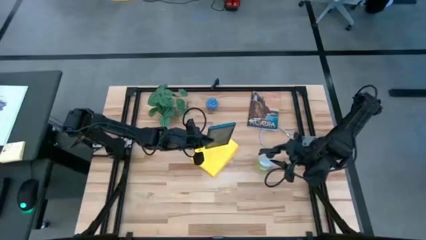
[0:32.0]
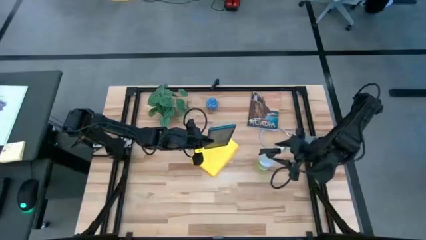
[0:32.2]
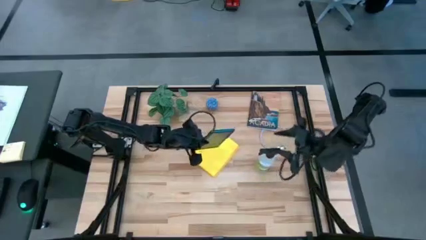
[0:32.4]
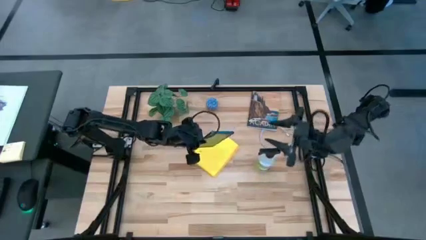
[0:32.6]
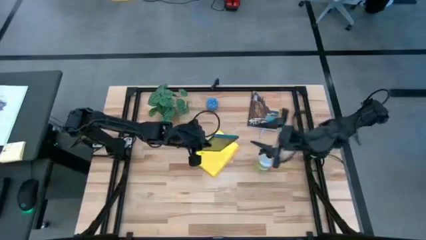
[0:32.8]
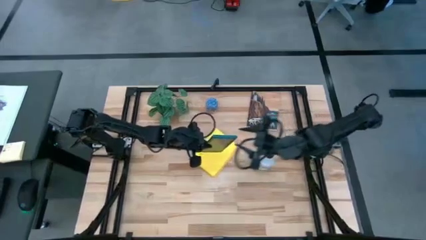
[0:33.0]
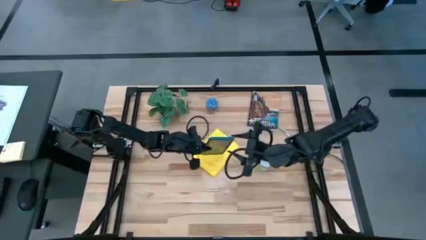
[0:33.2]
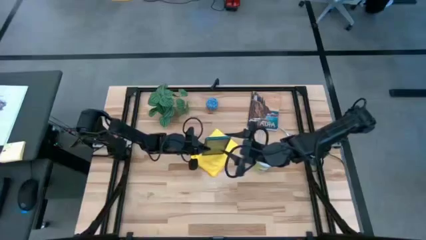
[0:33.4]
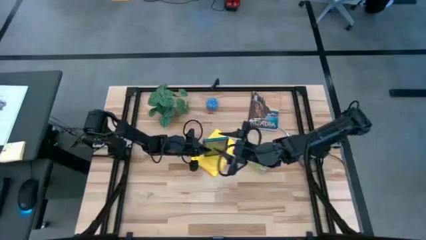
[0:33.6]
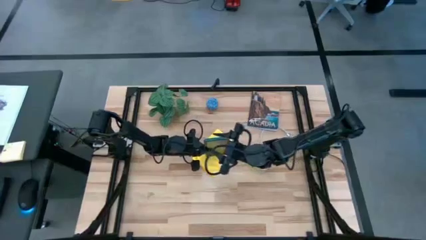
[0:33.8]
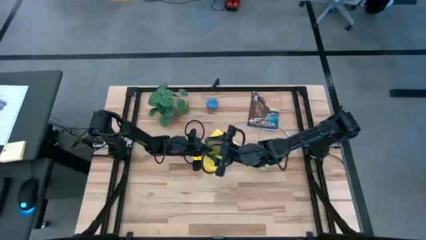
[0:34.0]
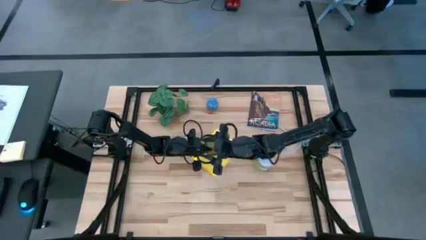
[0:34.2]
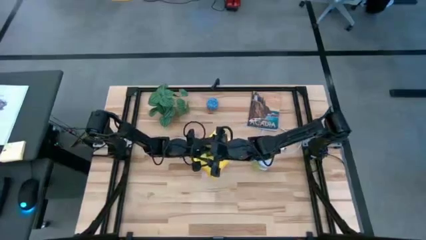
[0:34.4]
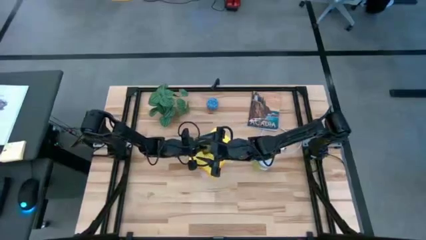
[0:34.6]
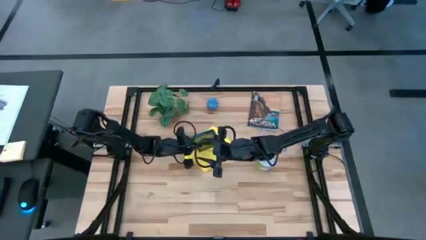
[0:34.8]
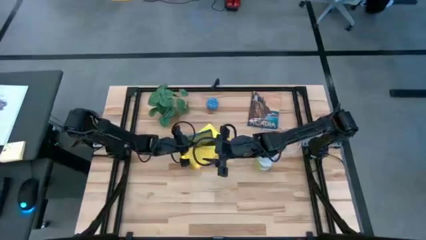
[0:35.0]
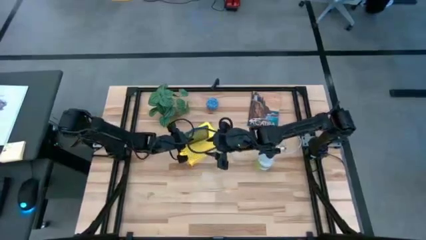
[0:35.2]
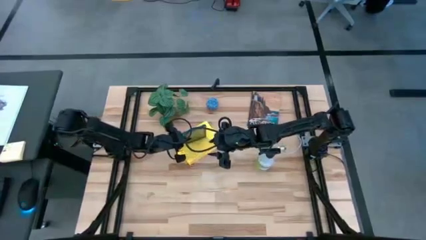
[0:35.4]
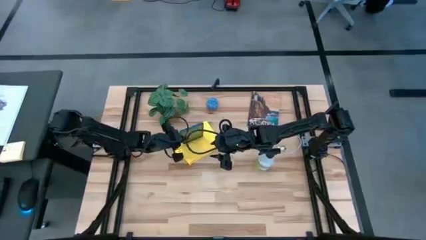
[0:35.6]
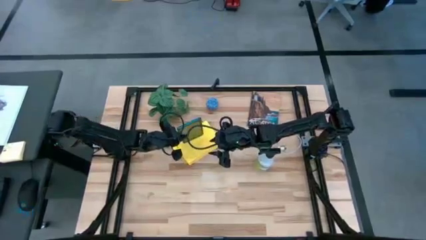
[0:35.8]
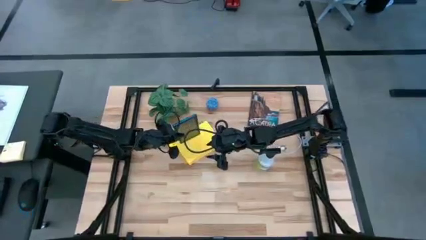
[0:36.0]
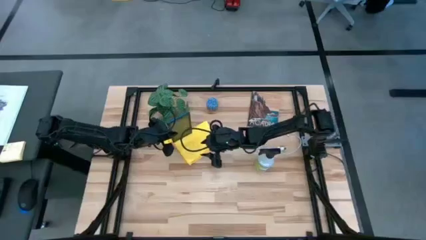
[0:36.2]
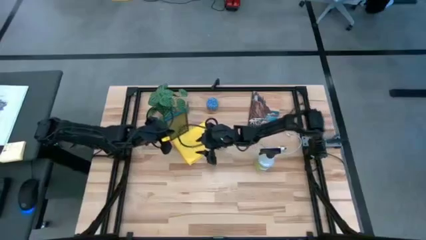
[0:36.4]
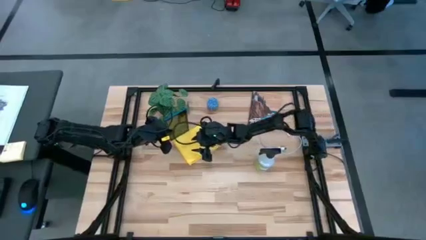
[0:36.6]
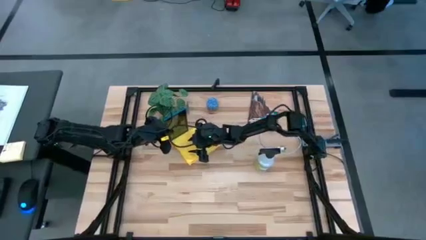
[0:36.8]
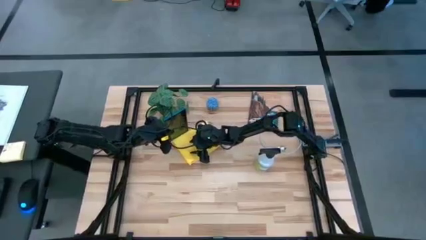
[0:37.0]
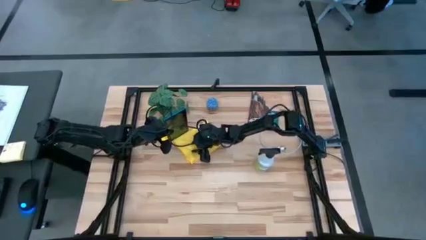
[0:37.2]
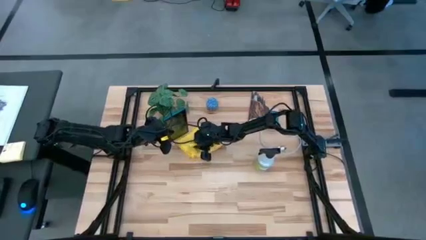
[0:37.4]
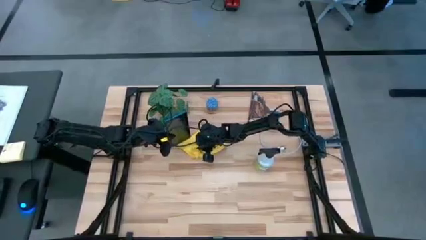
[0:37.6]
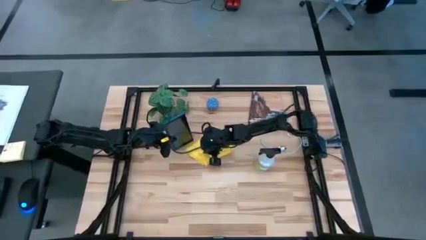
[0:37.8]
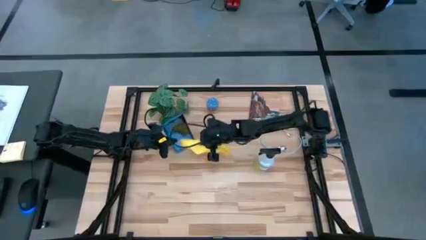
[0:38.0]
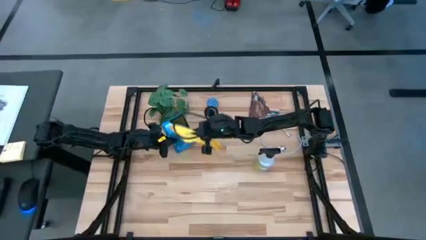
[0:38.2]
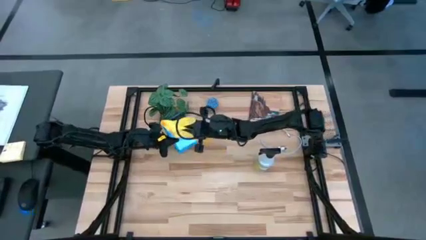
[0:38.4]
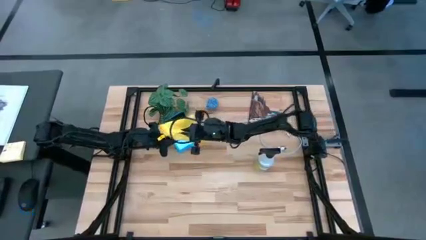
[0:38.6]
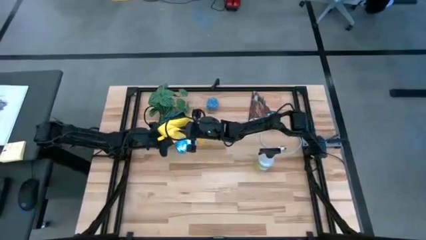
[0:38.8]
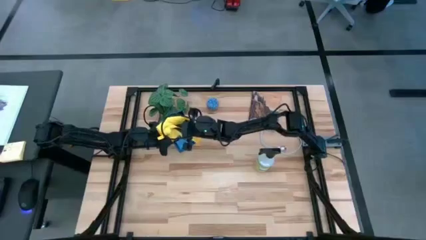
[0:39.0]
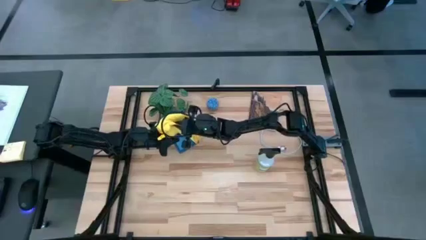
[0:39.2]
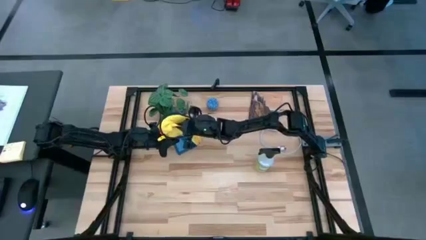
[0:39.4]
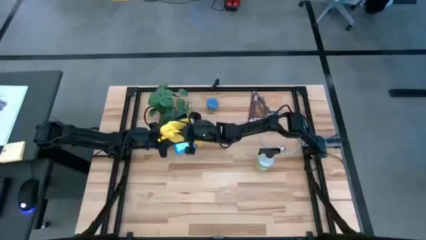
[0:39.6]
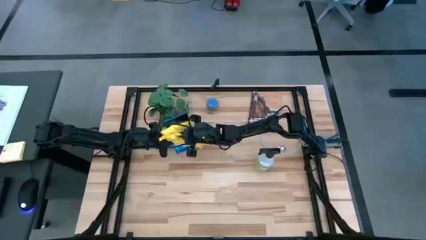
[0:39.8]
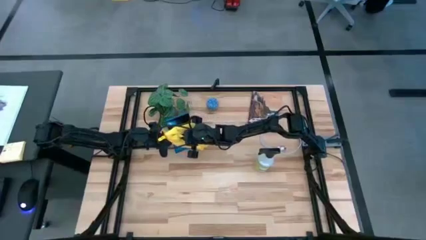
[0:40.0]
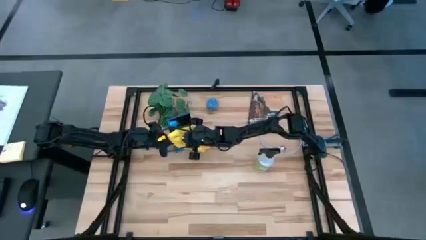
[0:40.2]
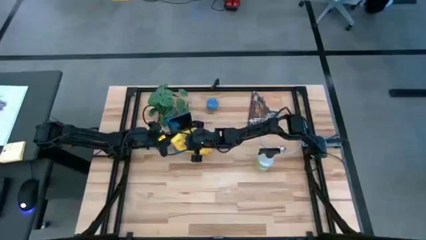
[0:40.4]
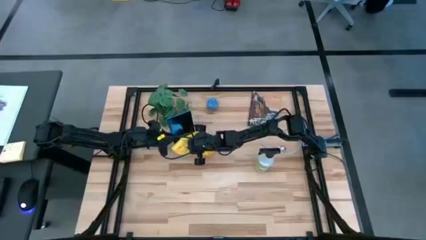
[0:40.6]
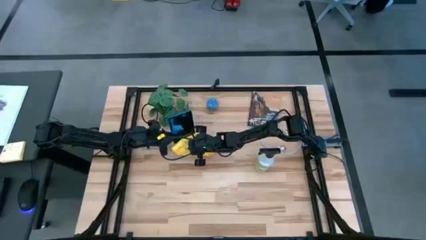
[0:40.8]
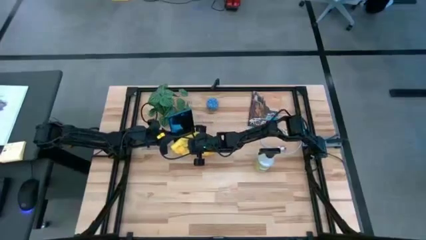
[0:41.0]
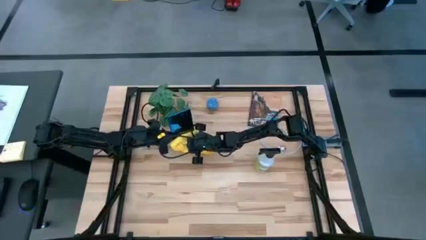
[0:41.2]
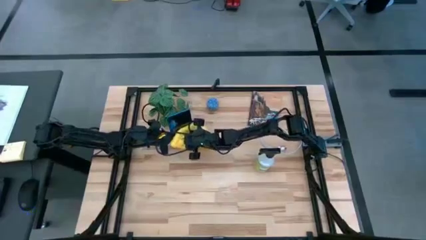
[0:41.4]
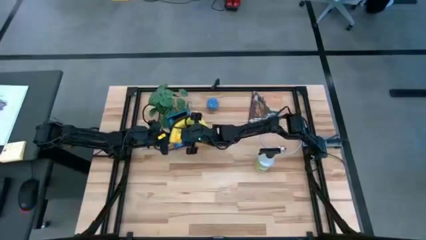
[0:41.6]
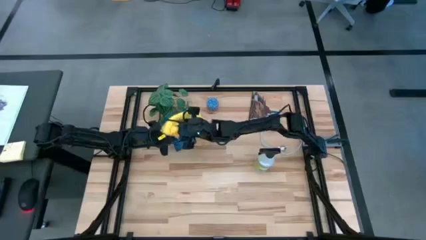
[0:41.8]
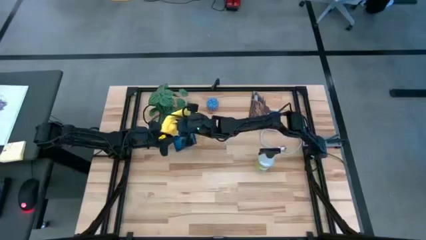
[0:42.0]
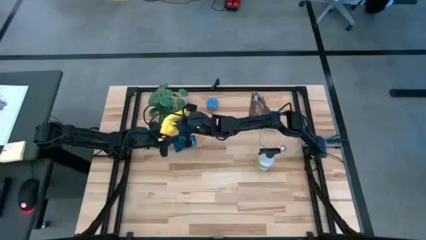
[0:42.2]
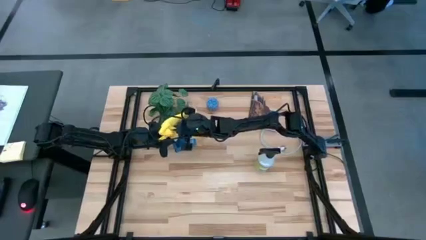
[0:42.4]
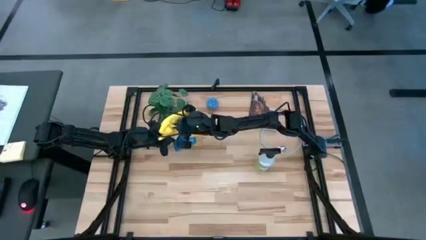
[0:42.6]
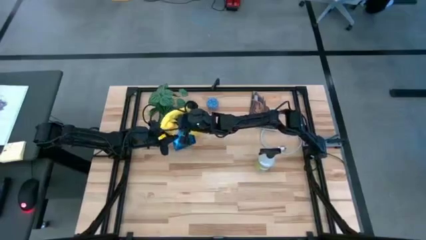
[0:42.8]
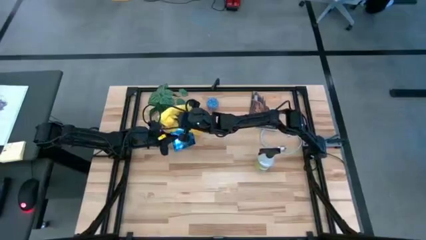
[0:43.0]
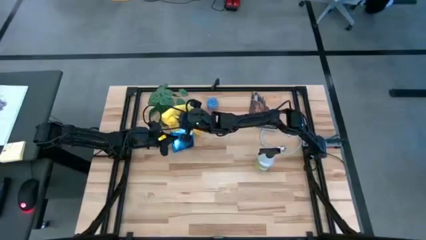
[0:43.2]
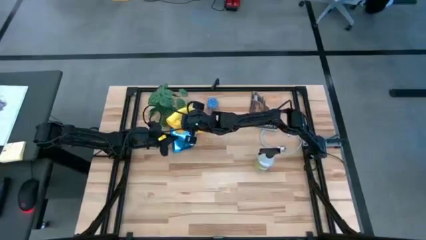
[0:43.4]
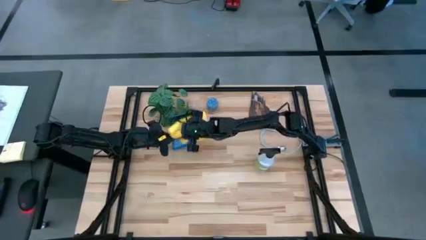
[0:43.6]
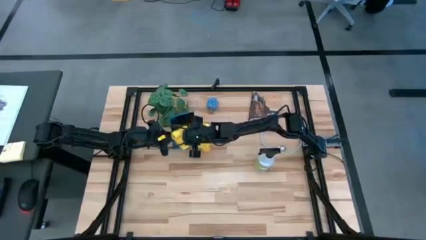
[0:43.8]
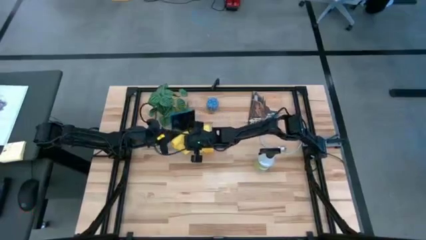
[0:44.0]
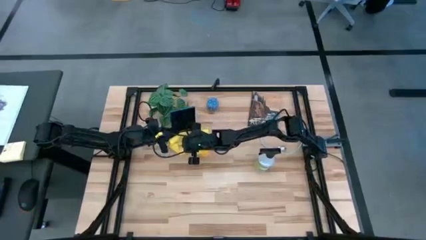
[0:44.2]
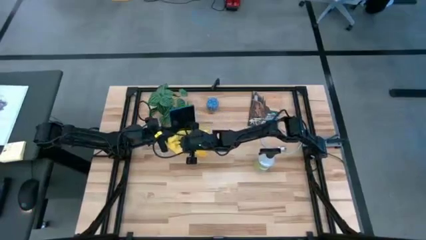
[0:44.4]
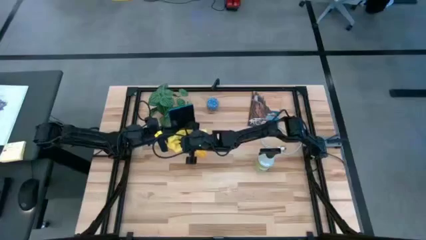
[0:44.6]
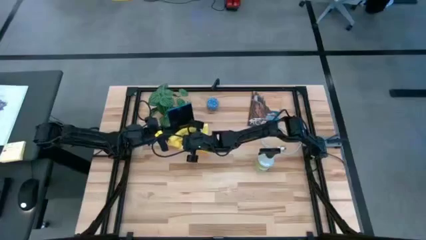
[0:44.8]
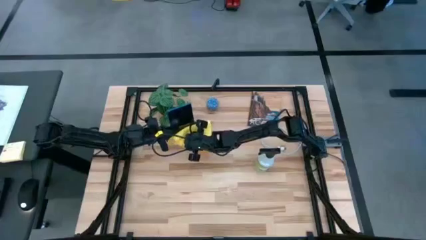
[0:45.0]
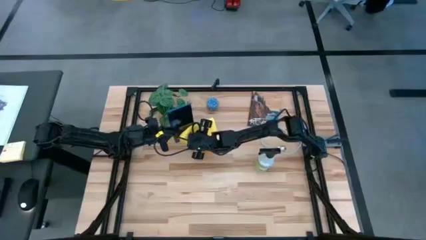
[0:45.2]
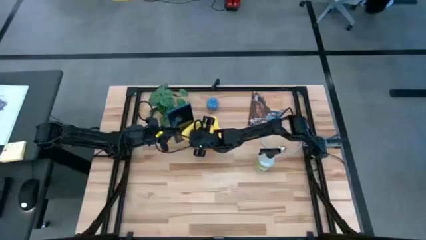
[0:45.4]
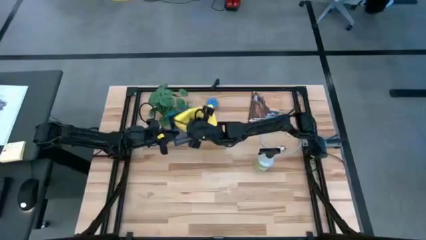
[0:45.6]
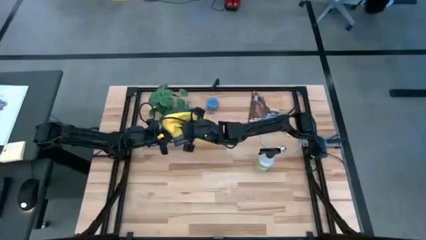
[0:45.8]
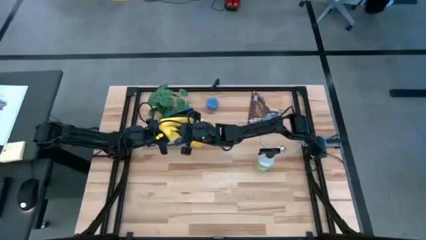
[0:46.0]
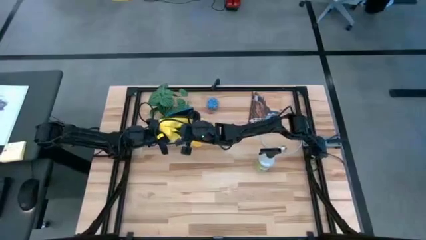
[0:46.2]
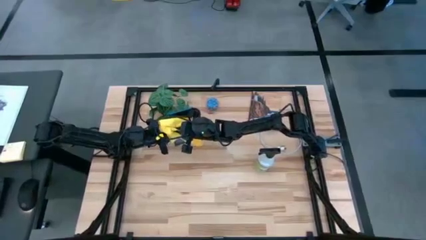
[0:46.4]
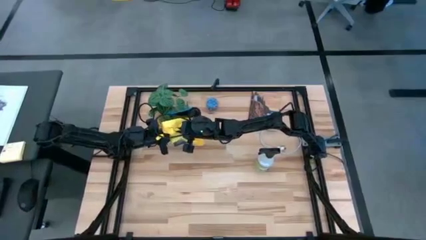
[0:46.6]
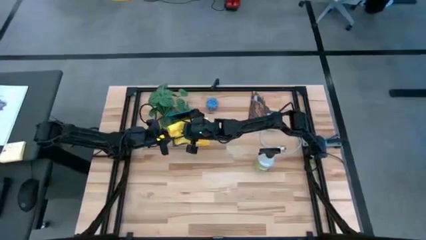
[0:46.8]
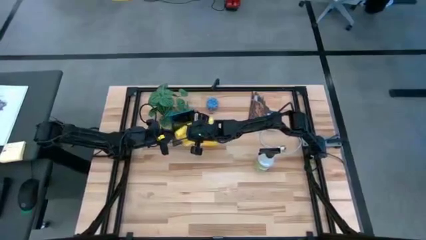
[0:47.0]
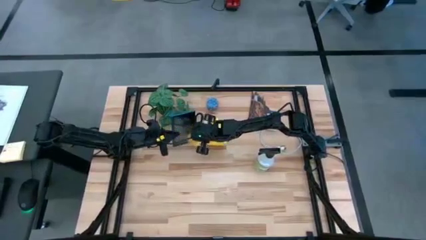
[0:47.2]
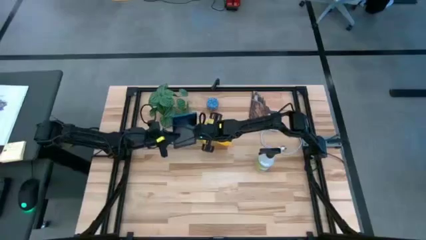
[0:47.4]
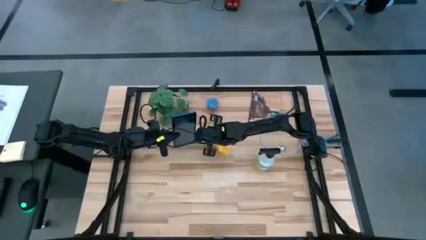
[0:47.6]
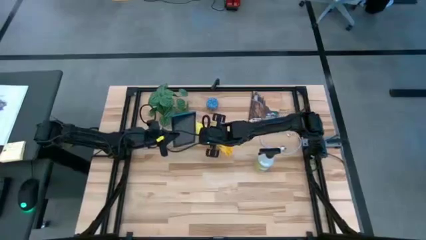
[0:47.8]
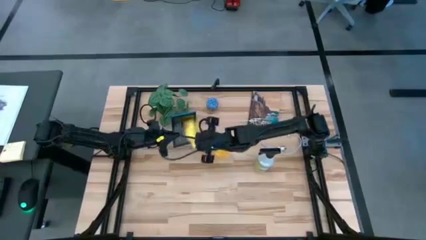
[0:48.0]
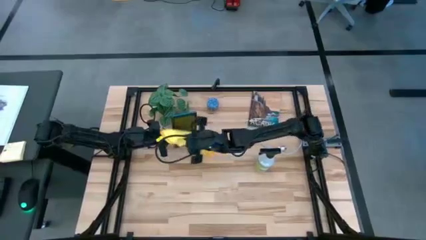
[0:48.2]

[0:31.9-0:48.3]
Task: Apply microfiber cloth
Wipe the front and back of the blue tablet using the yellow microfiber cloth
